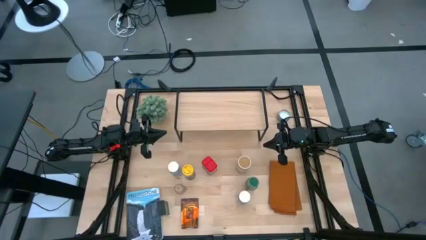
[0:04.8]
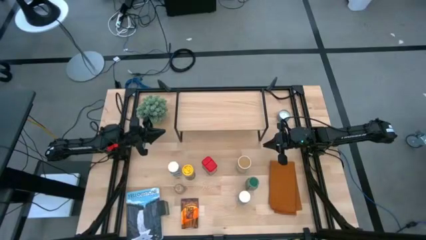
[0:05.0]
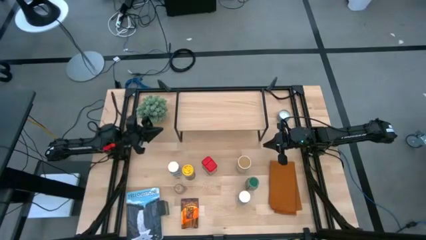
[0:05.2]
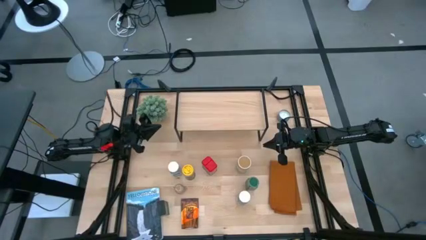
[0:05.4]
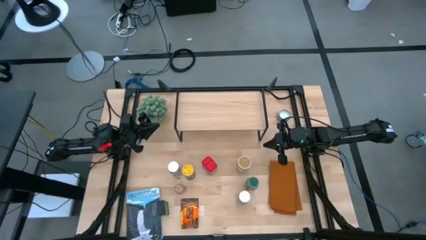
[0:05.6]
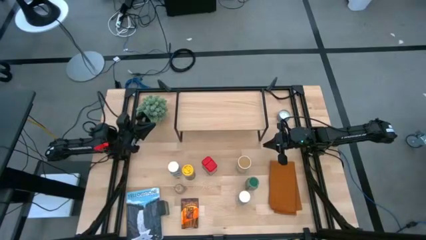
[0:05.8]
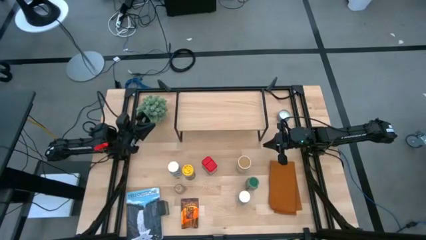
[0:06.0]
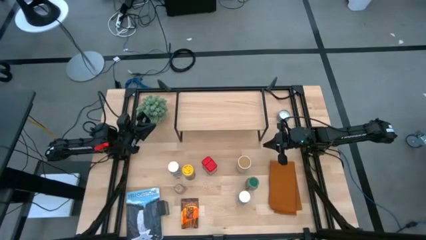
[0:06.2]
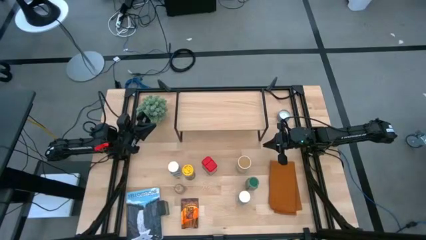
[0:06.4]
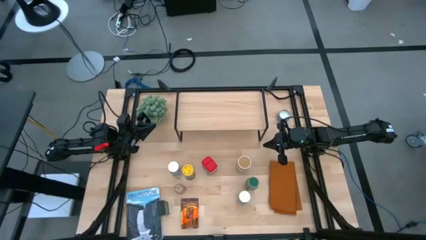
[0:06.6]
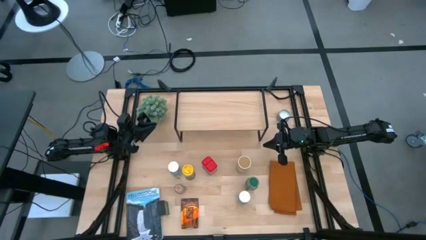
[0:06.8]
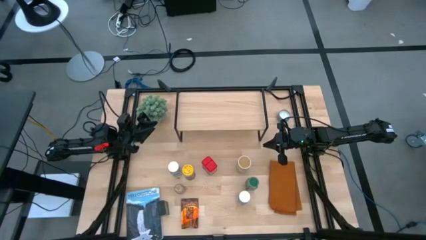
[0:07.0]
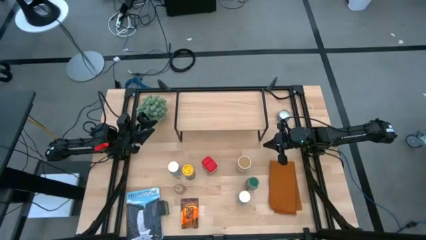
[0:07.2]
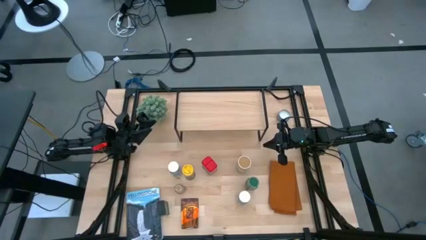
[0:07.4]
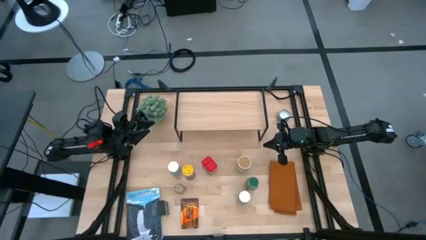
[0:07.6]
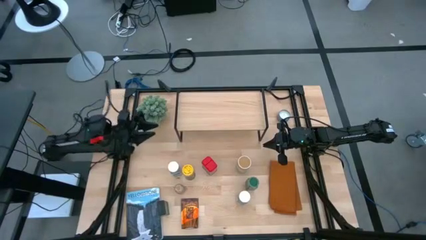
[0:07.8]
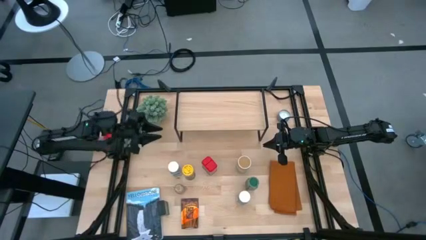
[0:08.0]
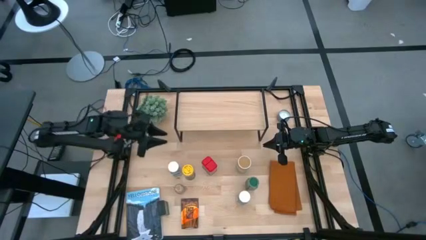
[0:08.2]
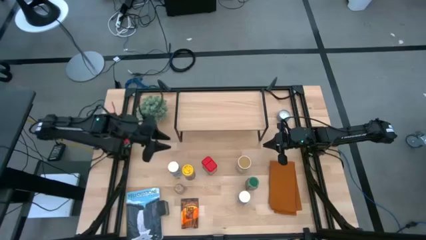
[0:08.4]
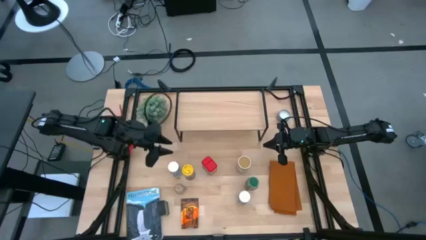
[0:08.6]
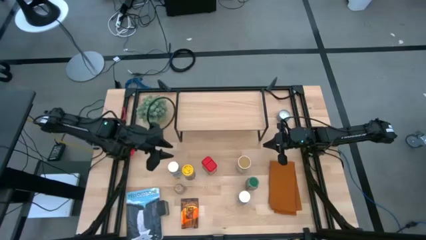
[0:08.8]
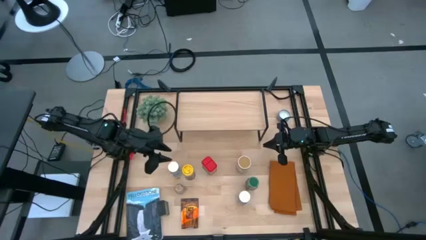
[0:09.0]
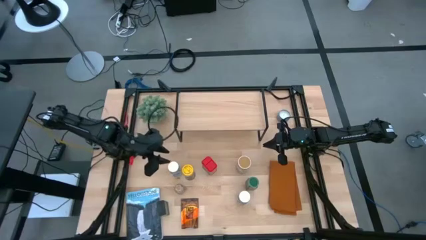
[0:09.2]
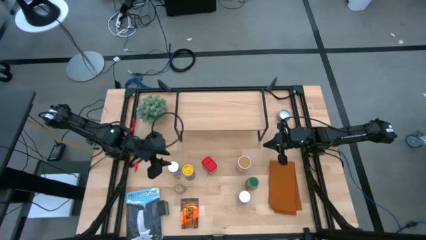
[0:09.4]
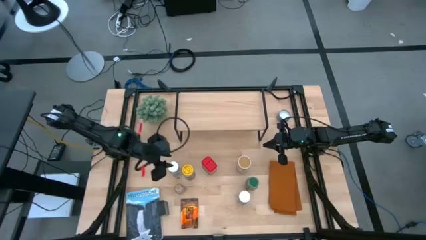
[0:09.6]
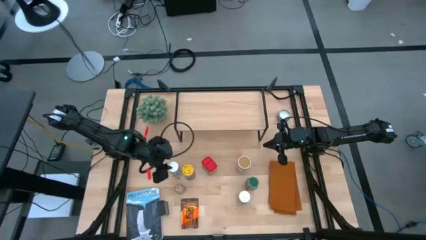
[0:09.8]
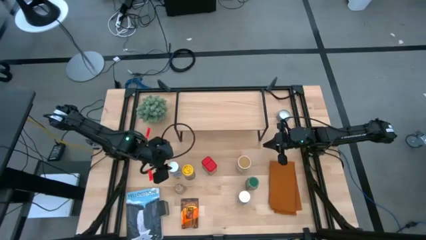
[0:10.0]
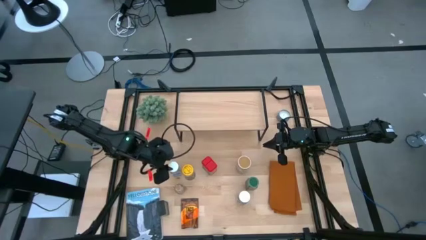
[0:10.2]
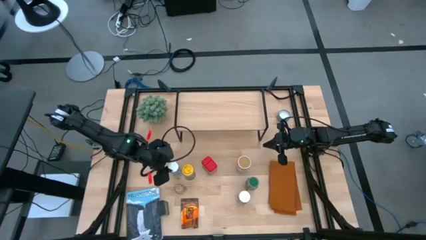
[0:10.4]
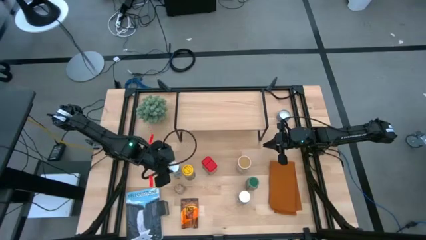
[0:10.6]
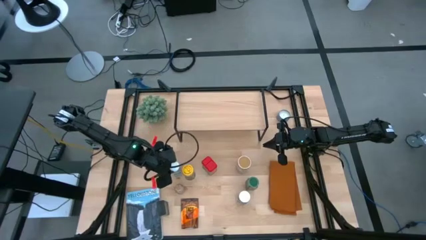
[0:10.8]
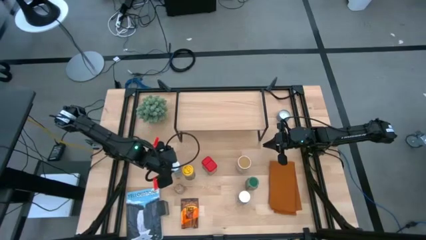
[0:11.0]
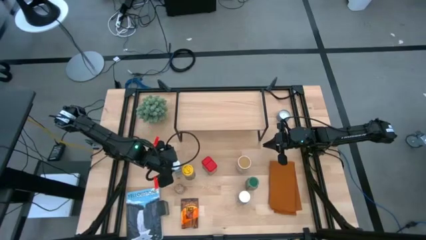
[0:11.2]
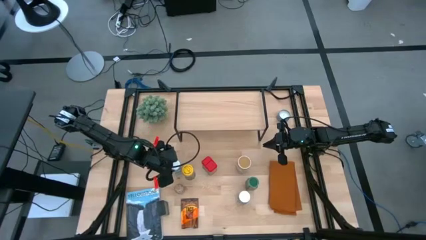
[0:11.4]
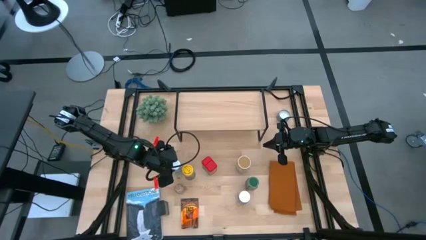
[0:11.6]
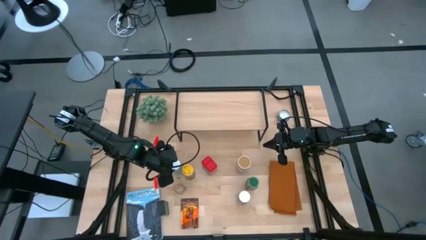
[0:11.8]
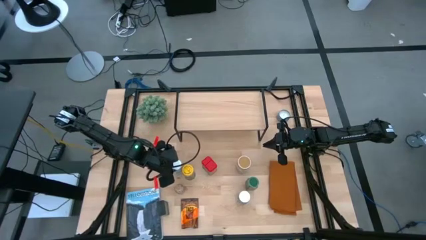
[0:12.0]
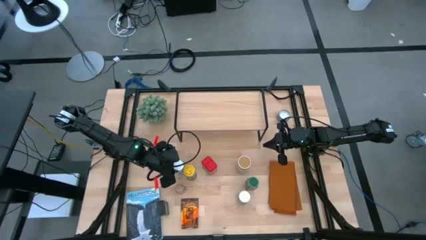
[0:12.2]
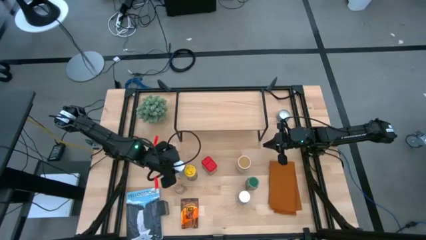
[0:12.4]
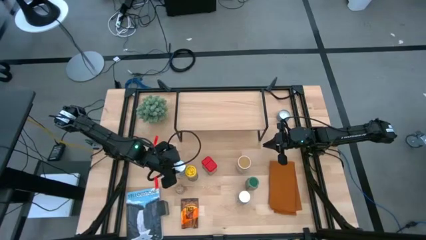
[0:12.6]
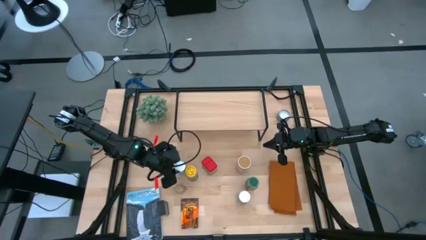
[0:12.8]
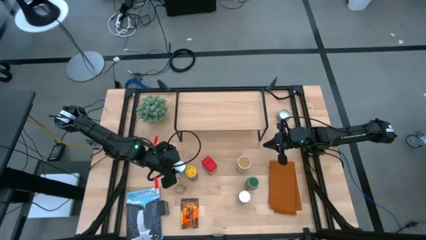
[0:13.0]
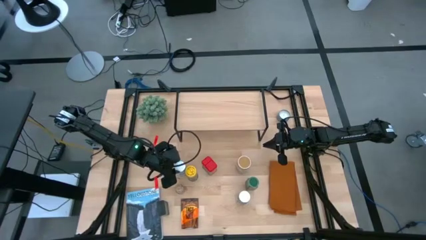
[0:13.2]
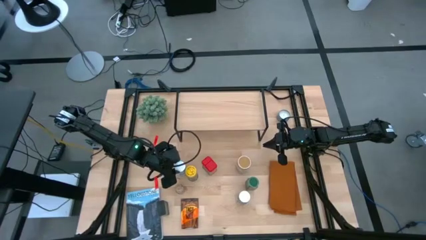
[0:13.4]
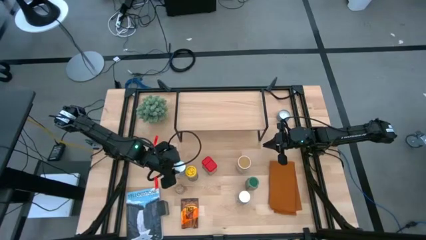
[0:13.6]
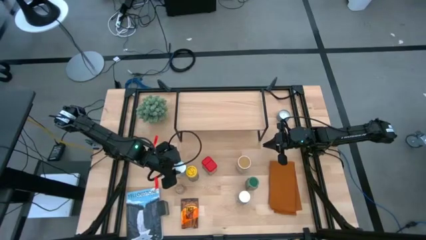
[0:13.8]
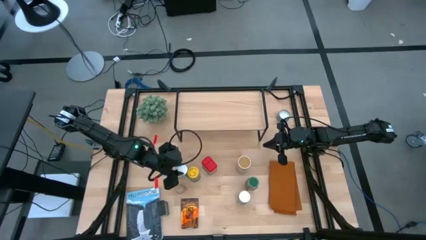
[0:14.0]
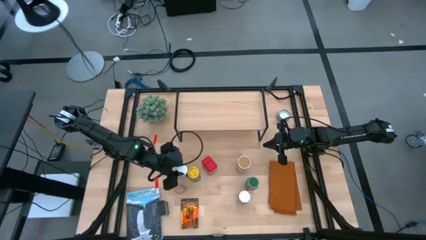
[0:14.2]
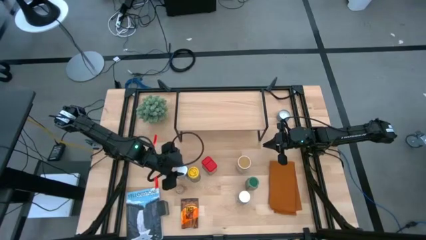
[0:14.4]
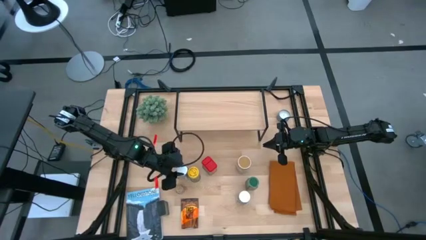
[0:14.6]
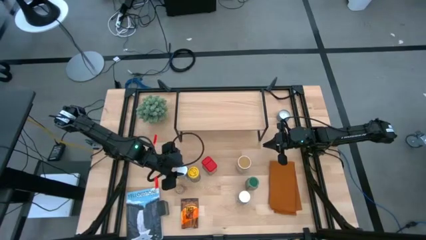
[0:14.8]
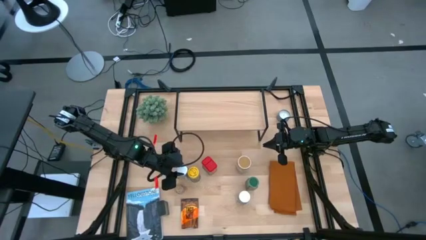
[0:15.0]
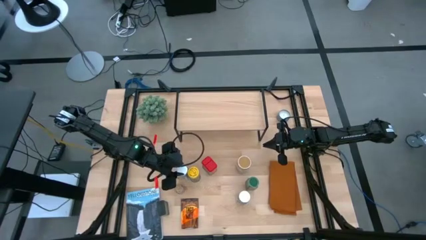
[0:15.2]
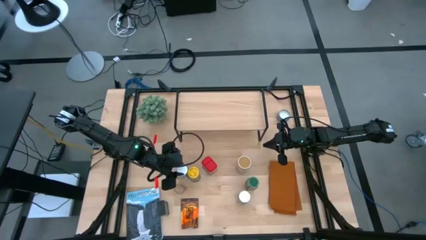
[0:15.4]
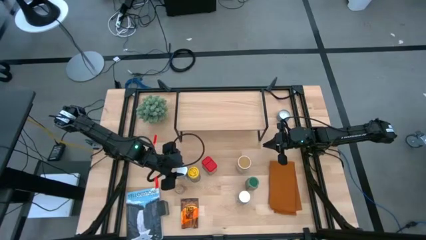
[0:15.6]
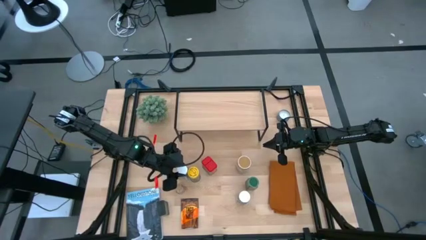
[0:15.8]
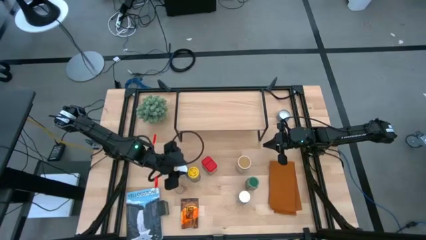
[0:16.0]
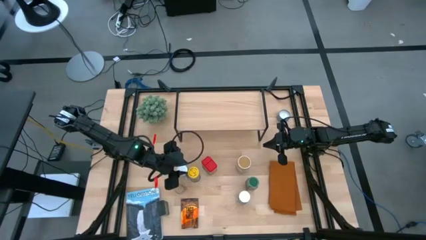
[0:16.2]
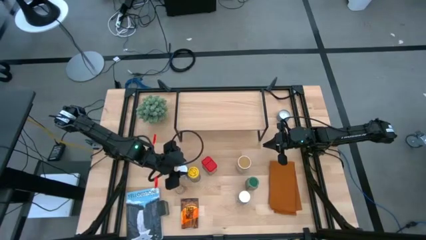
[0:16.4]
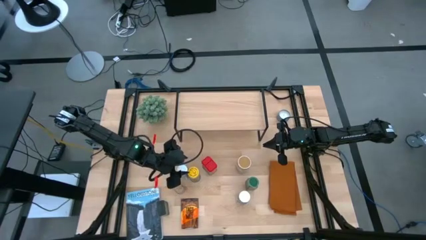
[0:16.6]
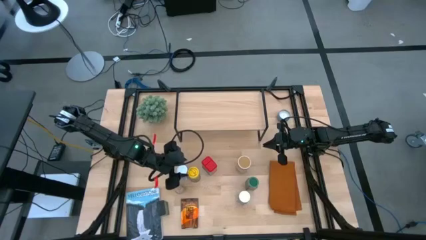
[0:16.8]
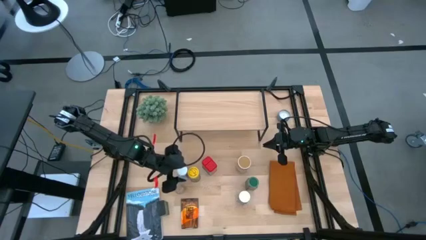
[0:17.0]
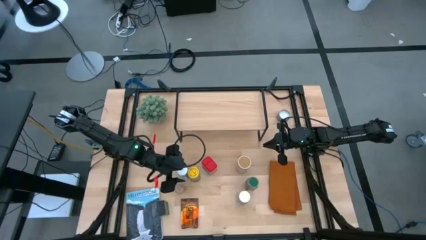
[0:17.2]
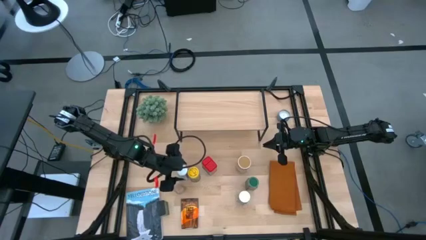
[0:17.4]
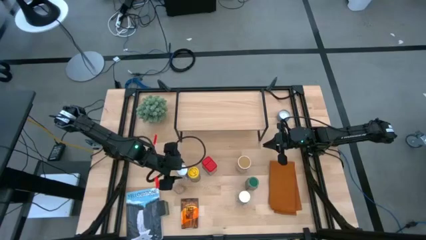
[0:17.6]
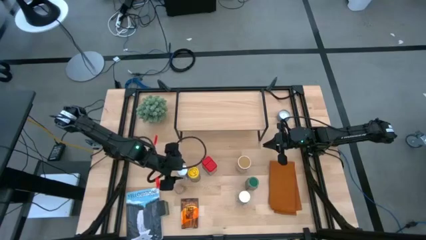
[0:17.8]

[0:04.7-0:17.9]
Task: Shelf spices
Put the white seasoning bottle onto the shelf
